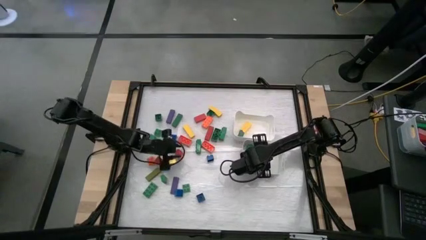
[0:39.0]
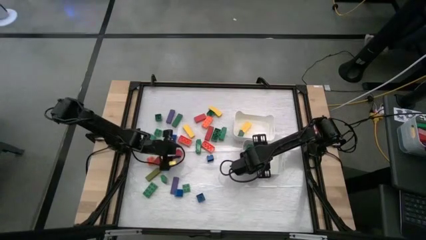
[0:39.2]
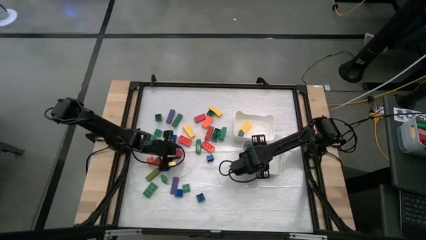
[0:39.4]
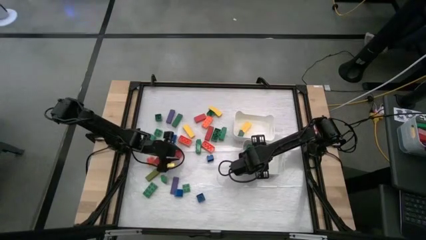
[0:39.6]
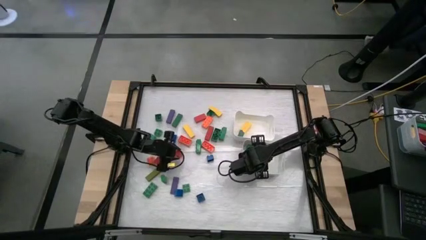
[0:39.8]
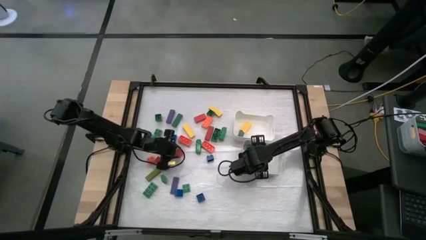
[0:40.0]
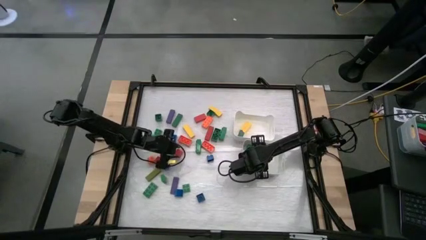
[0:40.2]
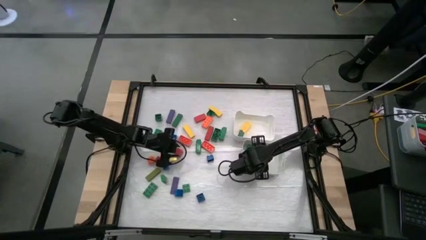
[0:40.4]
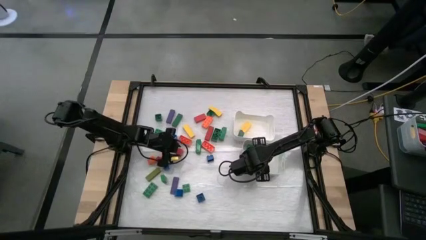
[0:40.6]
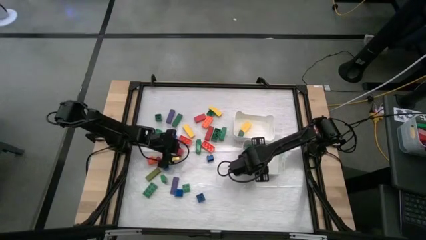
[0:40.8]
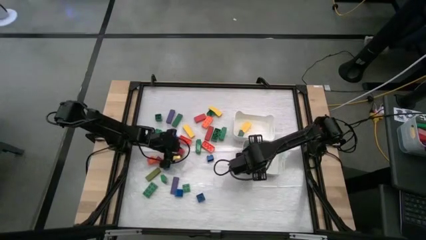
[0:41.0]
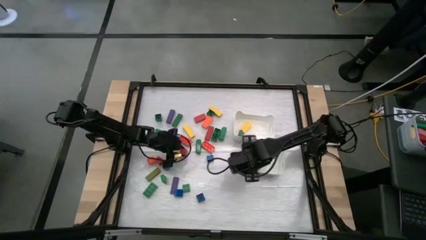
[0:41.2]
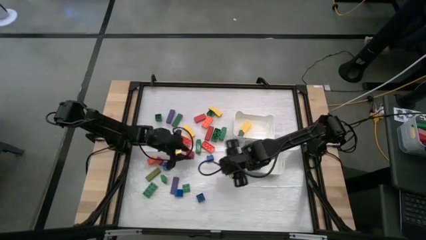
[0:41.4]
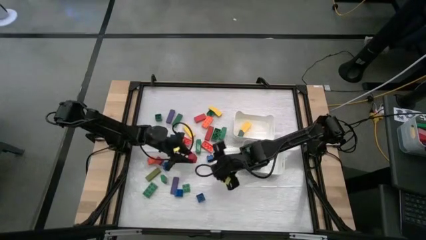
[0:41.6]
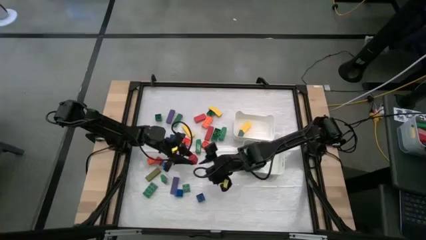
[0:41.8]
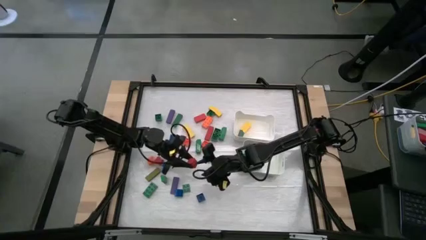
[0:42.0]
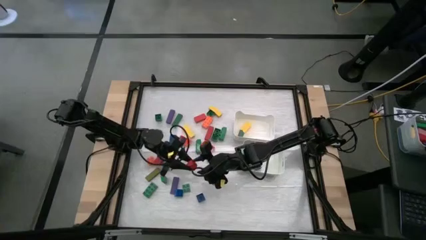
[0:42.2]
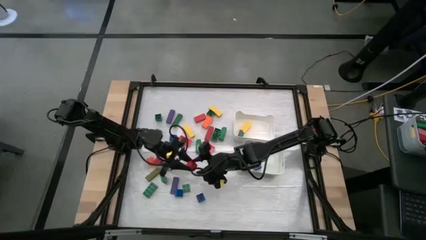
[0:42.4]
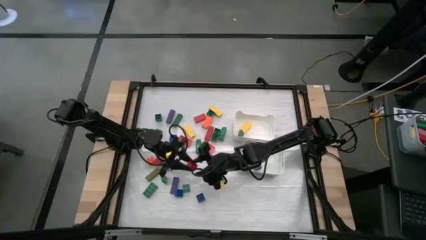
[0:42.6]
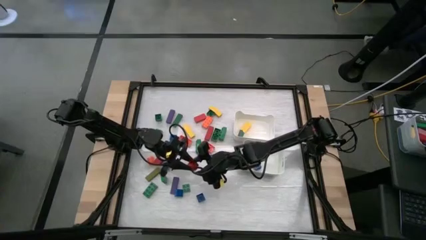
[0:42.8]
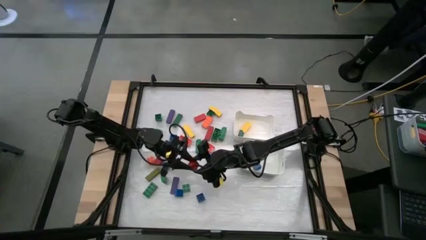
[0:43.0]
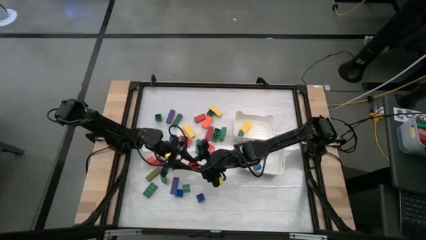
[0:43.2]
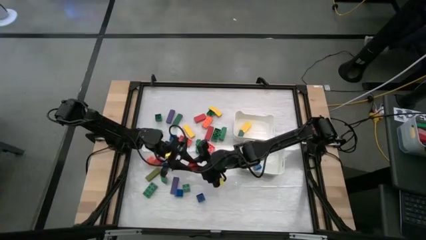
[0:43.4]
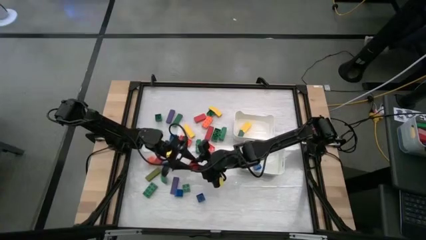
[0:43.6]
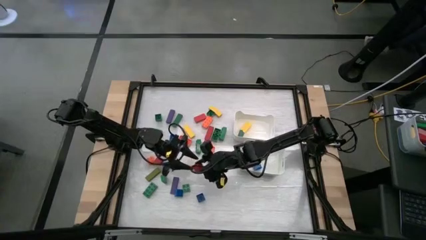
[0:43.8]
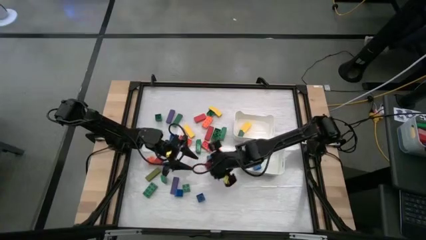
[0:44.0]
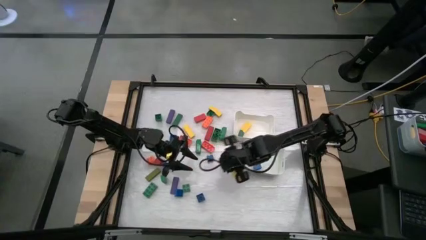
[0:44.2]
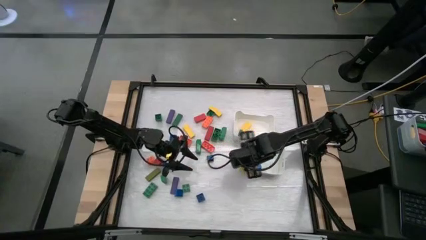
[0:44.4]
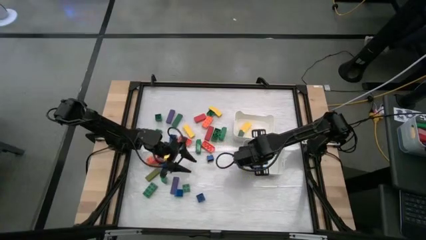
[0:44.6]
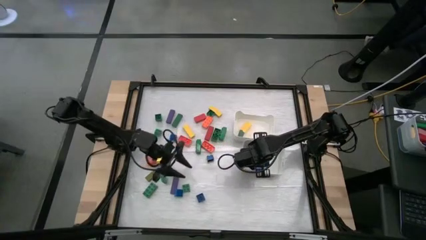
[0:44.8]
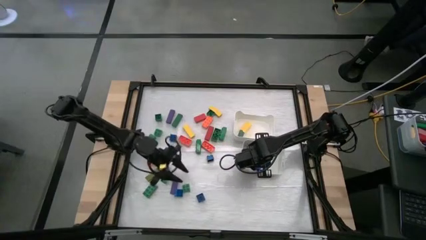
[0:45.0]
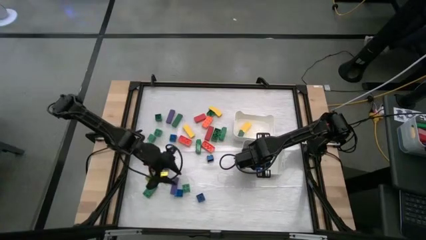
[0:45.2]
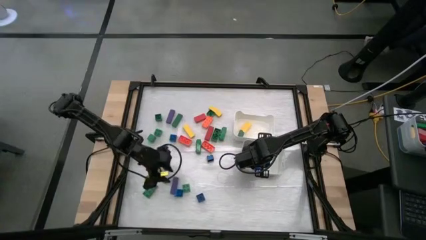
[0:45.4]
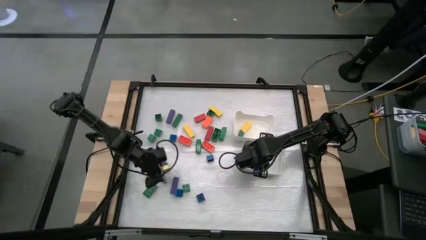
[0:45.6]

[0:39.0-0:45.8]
Task: Sort blocks by size
Put the red cube block into the bottom white bin

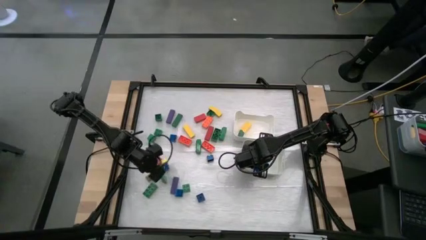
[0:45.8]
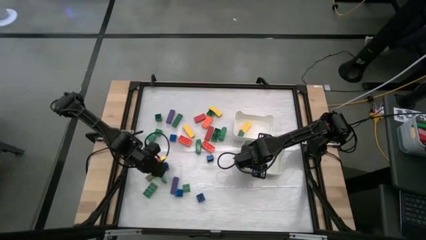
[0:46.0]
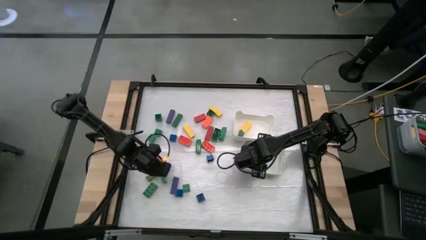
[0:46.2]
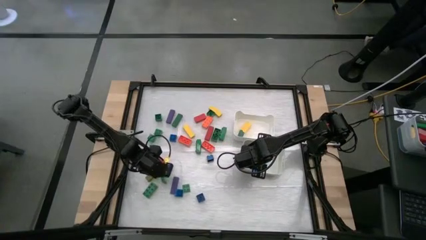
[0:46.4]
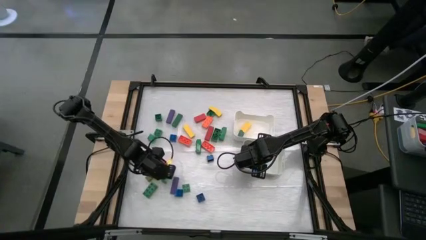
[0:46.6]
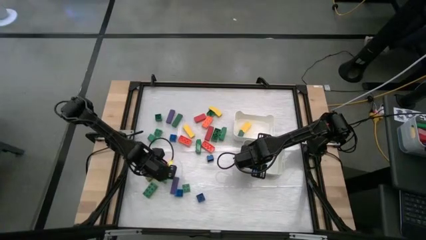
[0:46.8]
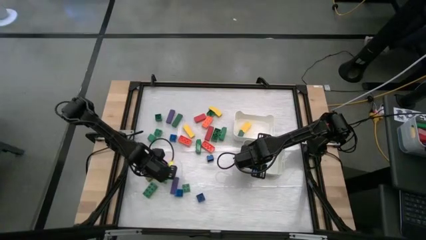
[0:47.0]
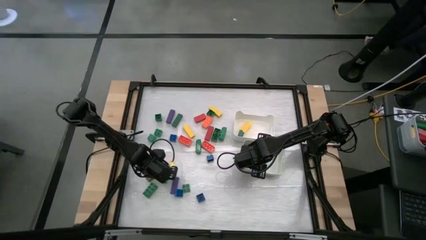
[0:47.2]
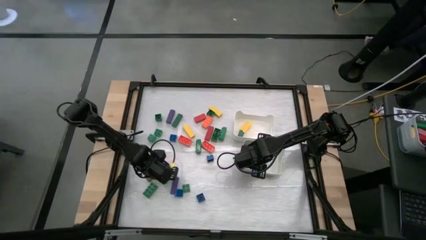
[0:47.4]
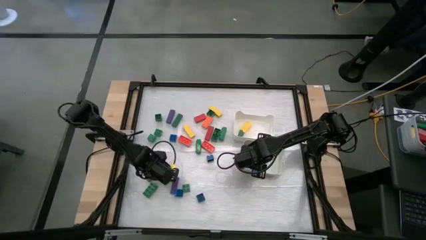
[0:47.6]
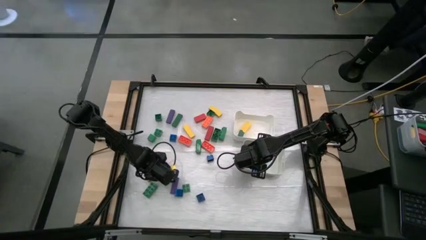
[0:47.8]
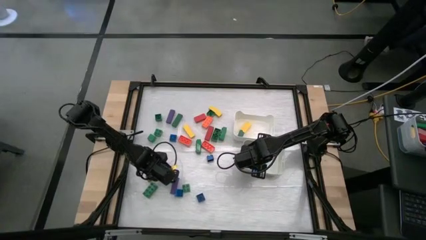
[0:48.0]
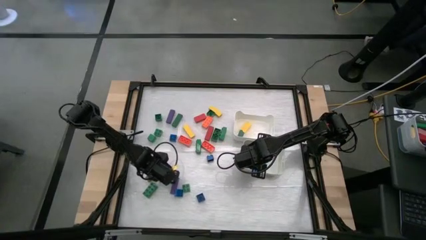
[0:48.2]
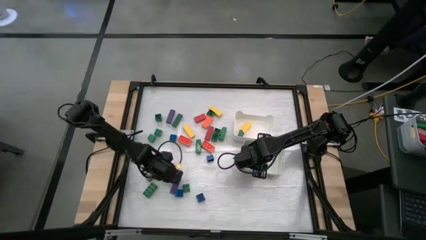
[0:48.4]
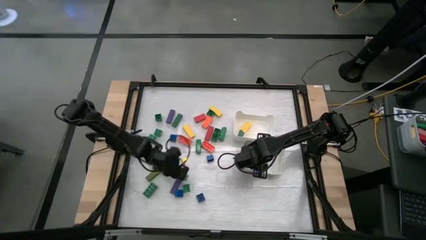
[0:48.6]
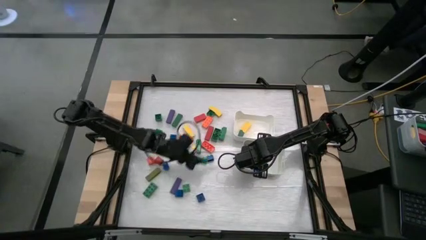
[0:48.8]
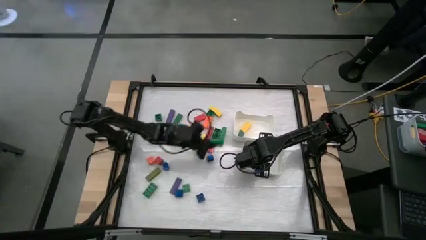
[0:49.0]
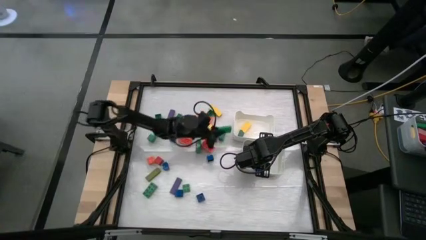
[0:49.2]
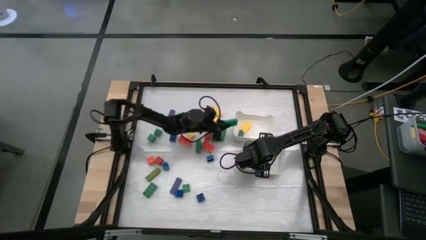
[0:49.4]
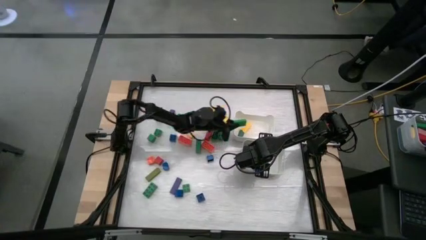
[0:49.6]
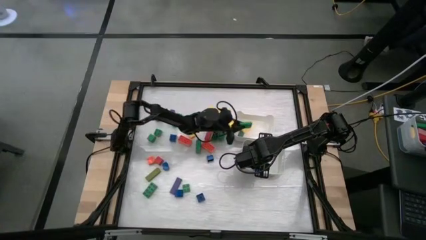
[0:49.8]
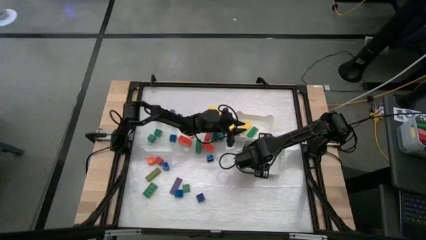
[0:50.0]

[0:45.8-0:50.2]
Put the green thin rectangle into the top white bin

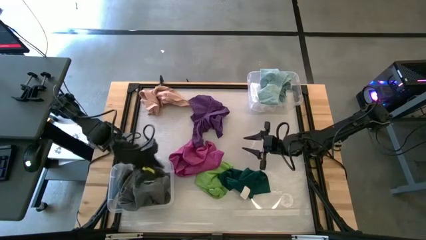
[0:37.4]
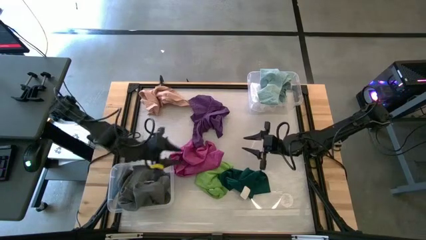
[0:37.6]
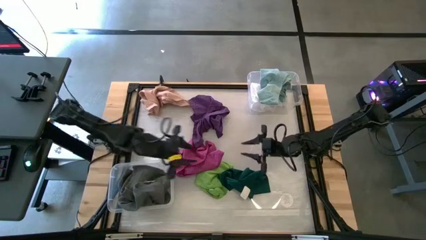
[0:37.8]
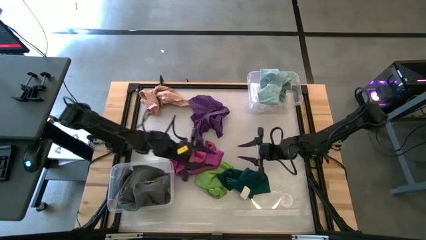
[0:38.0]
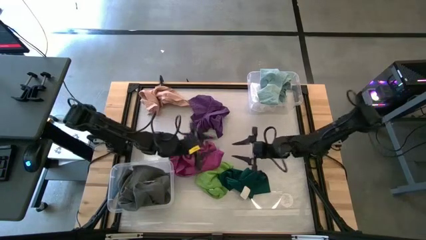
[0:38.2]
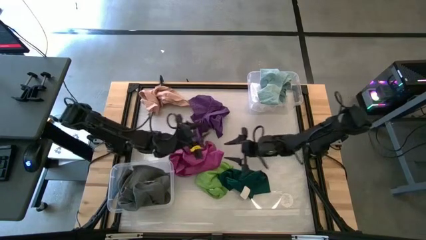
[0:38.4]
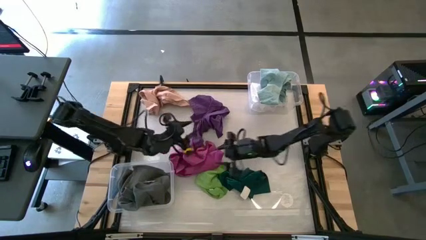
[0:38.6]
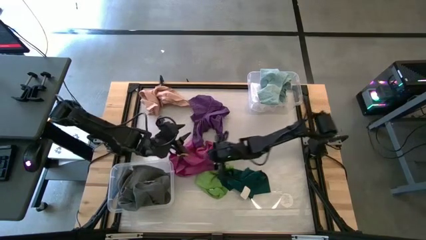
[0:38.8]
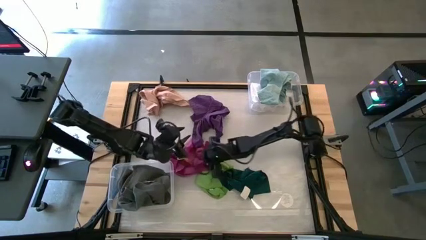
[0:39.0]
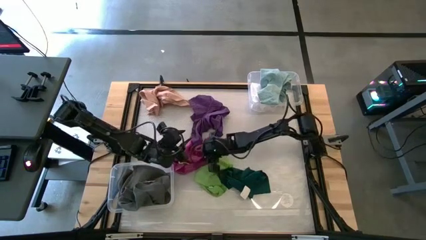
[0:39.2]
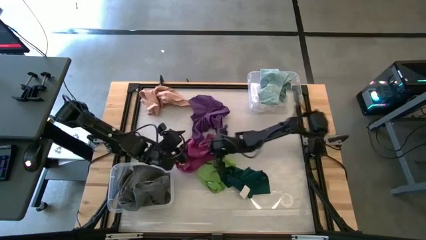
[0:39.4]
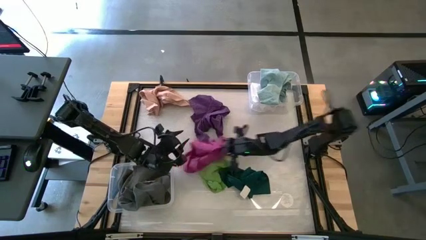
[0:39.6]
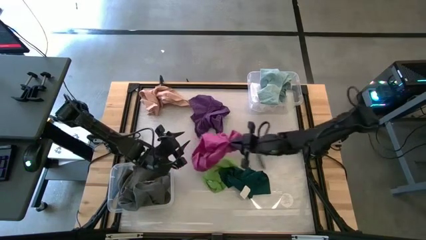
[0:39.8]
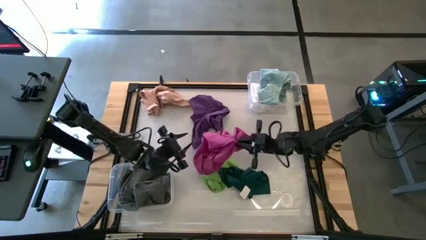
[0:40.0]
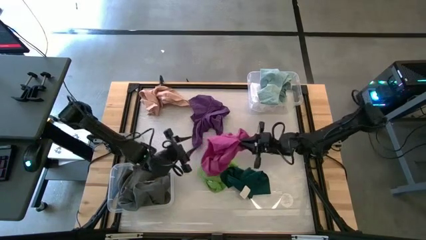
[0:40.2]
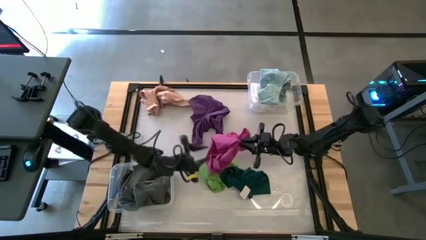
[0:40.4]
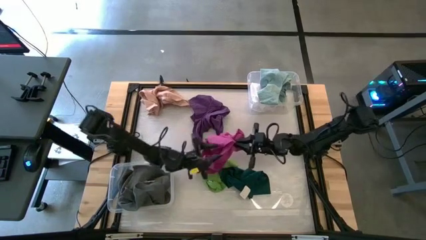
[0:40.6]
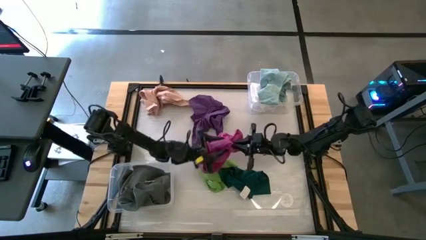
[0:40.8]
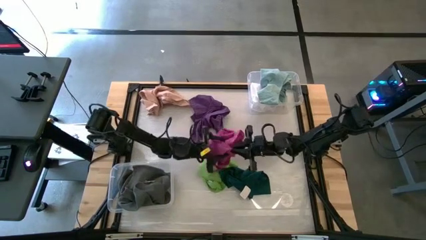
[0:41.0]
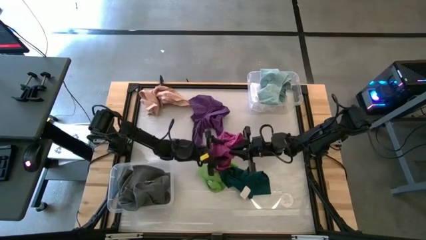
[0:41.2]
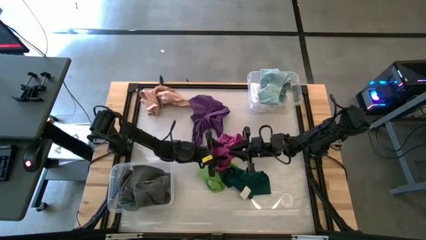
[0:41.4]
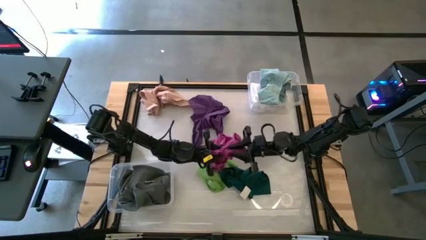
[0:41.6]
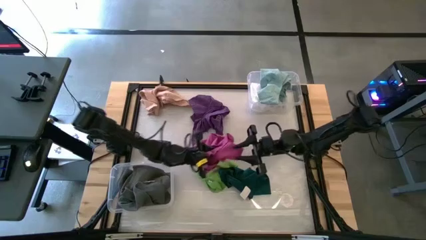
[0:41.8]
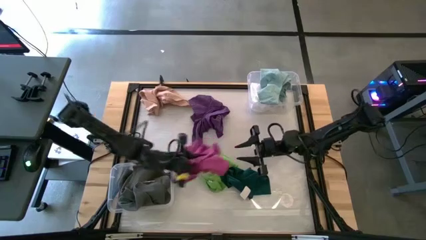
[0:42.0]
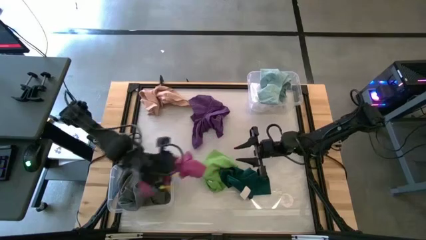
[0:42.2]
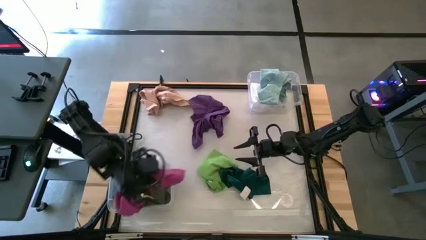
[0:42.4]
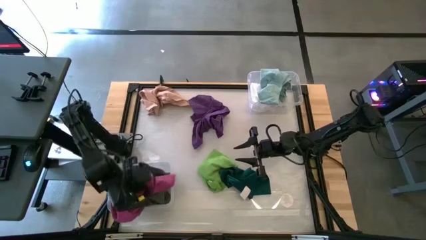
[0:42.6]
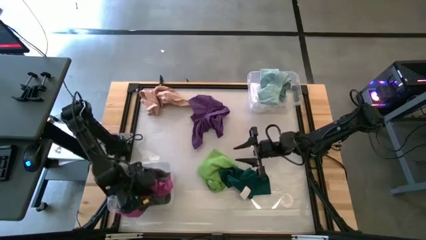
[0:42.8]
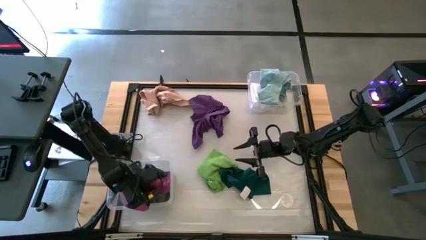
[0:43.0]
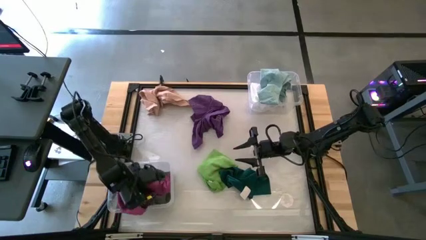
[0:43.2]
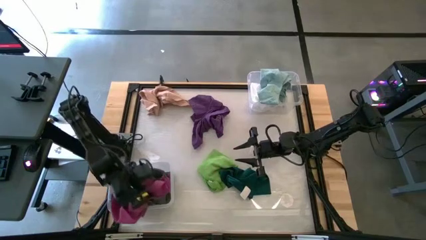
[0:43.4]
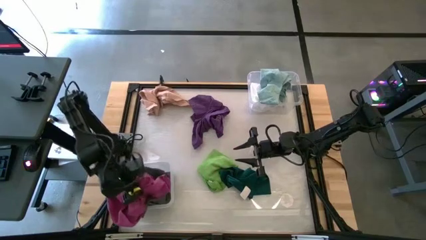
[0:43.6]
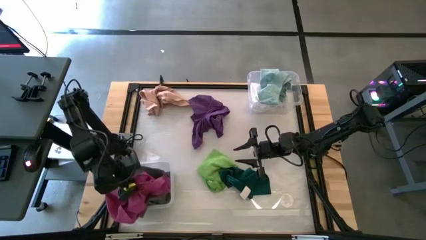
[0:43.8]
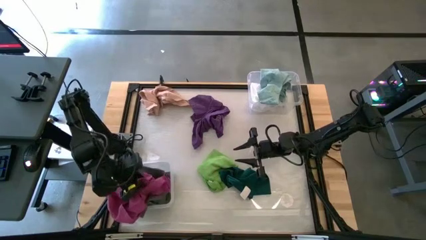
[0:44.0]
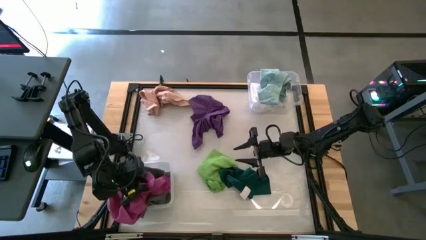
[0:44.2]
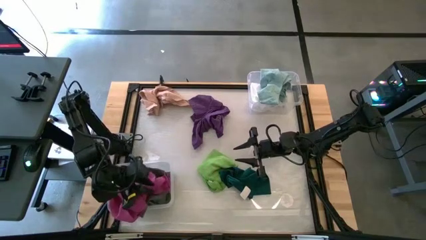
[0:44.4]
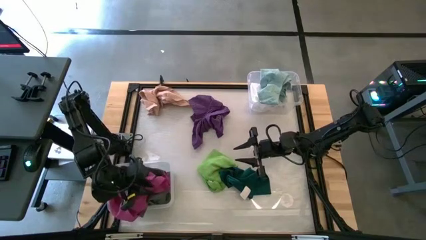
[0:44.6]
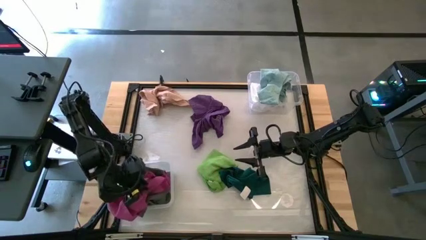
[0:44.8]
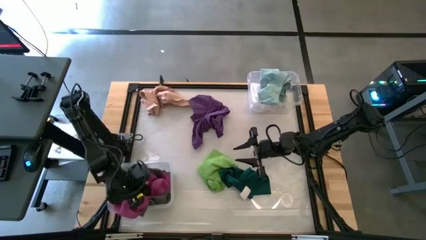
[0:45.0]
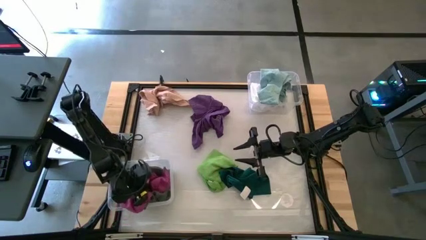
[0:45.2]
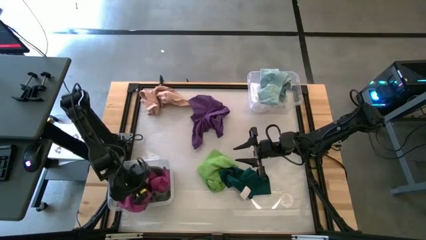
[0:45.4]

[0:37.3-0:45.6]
Task: Sort towels by color in basket
Put the pink towel into the bottom transparent bin
